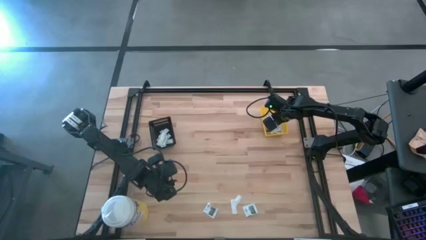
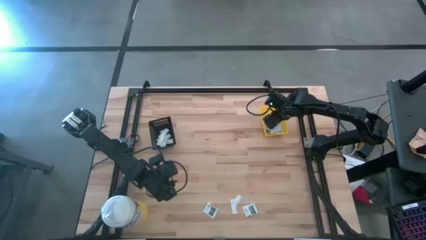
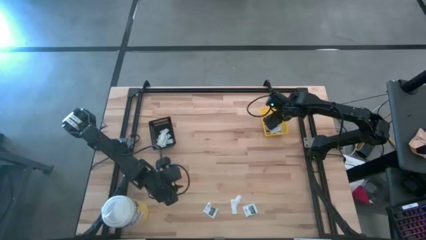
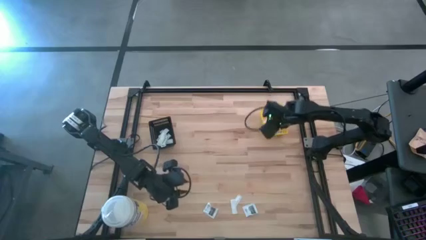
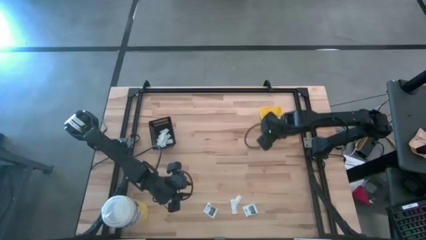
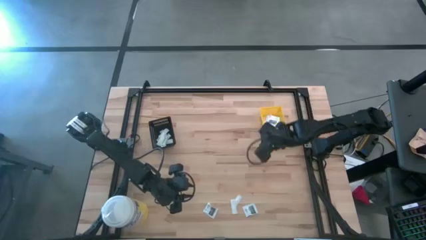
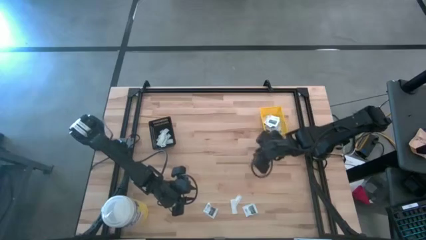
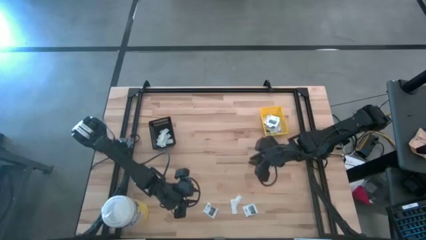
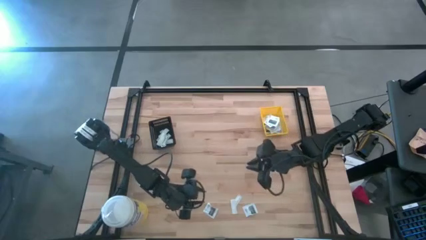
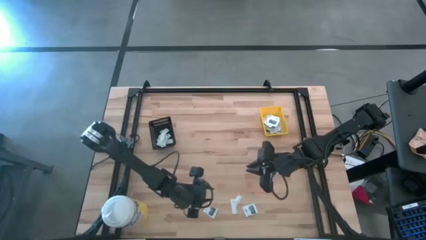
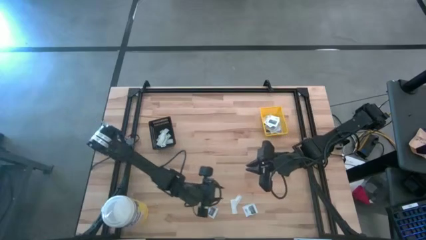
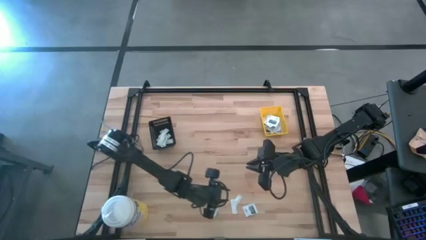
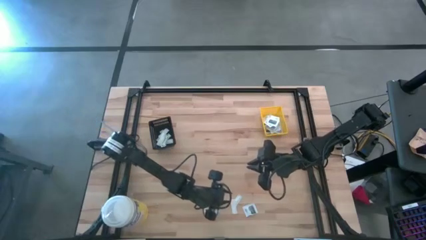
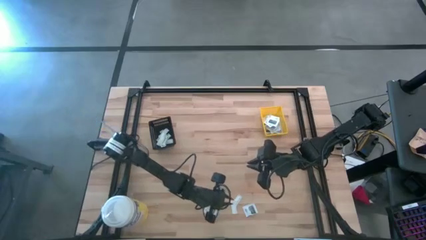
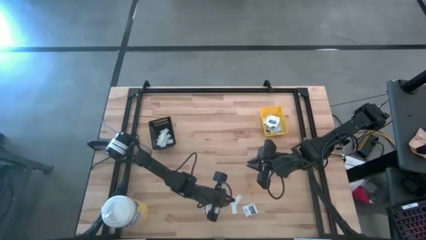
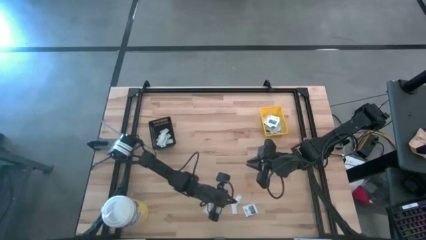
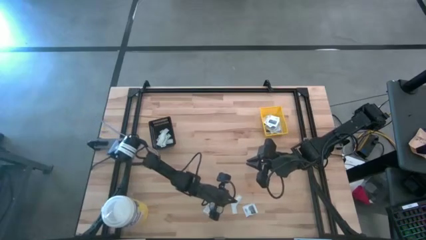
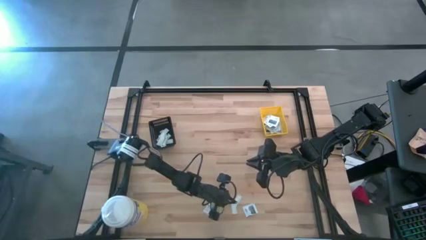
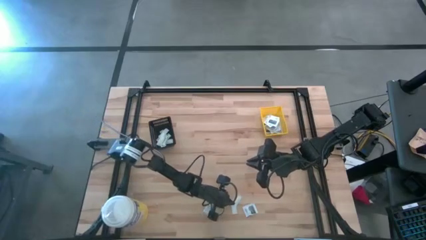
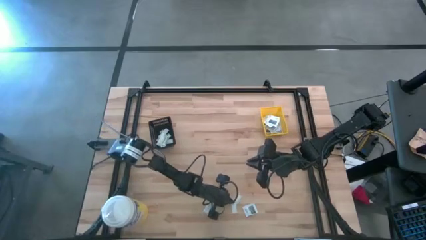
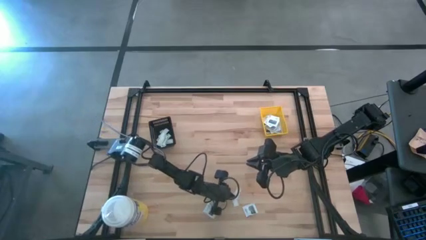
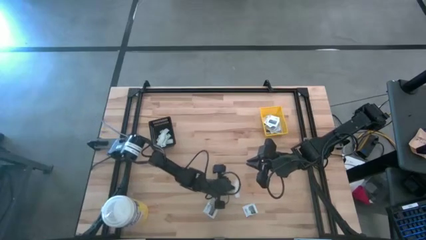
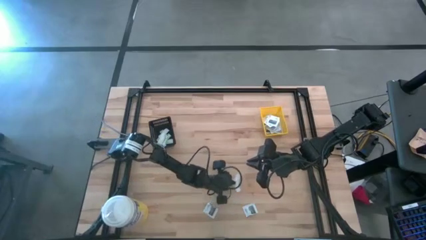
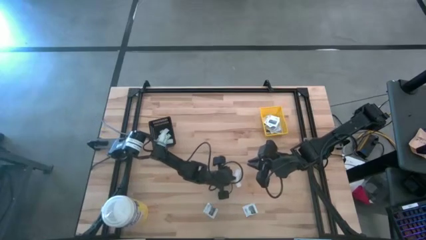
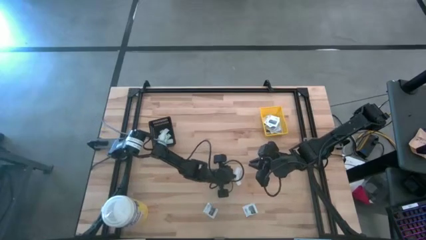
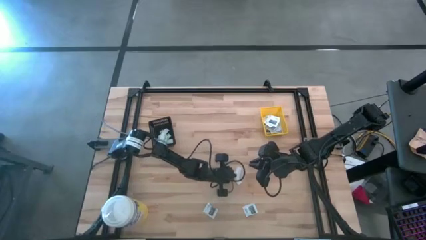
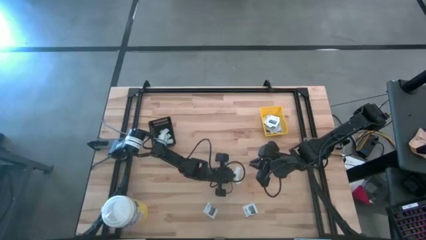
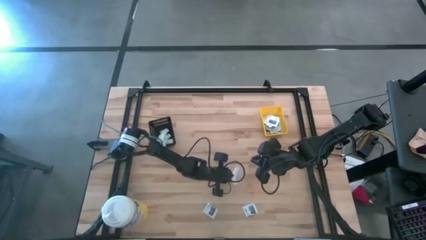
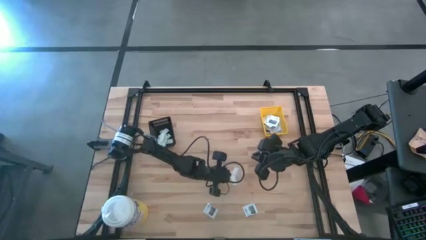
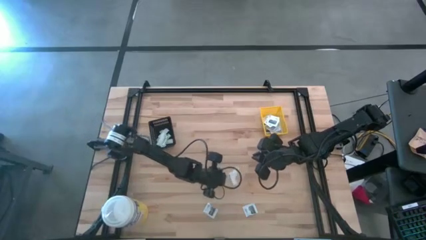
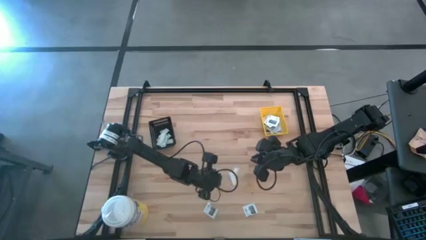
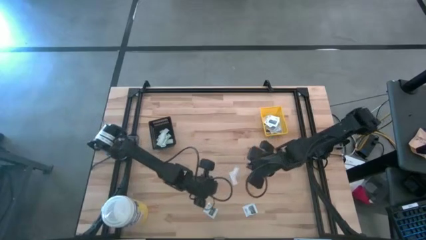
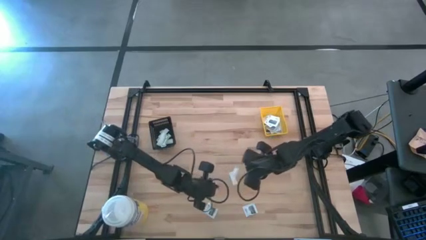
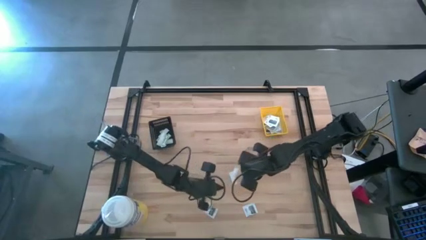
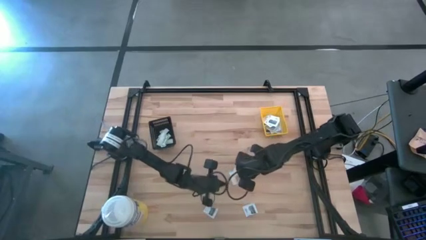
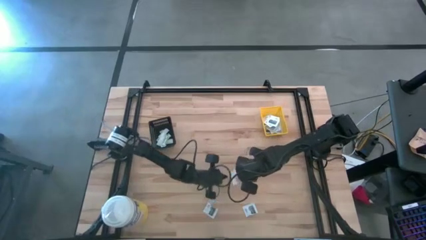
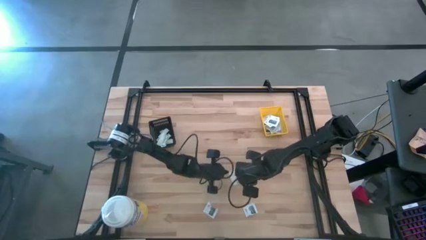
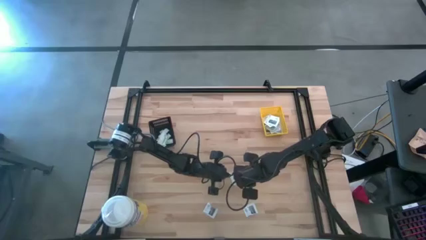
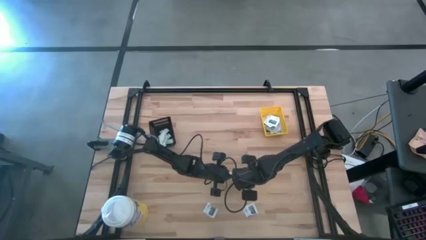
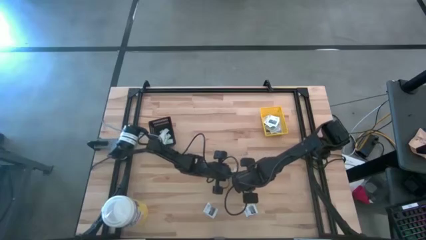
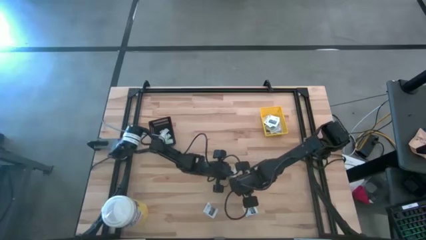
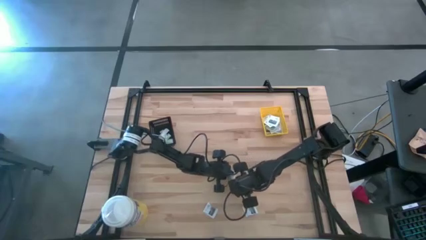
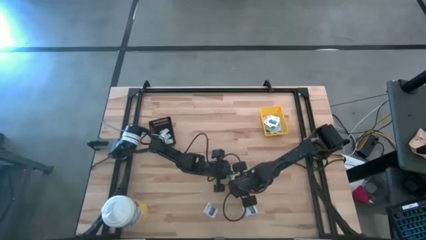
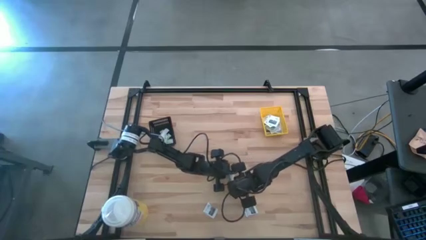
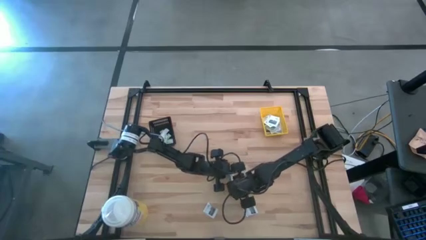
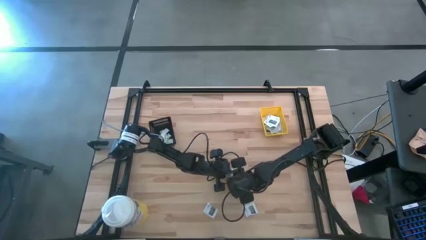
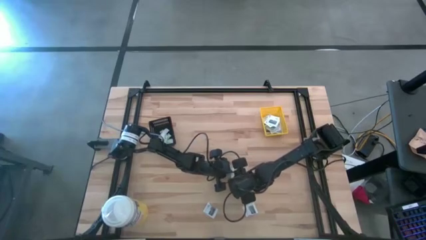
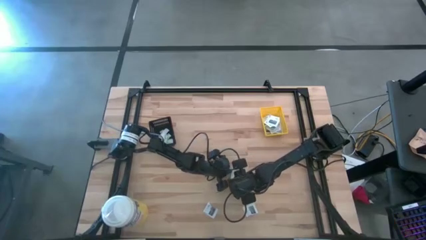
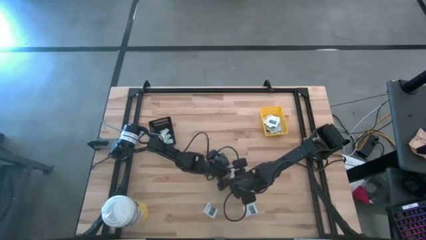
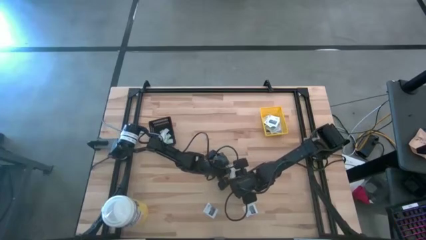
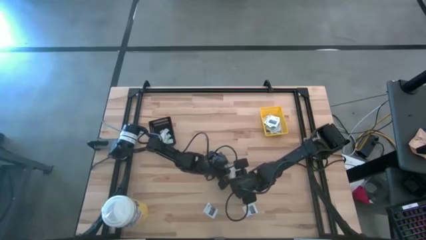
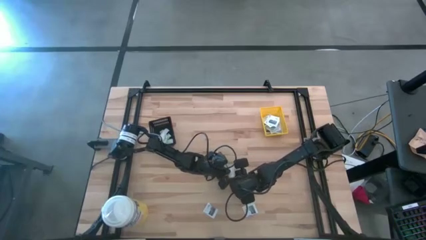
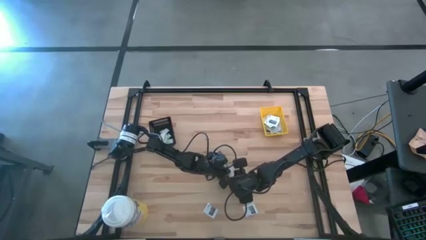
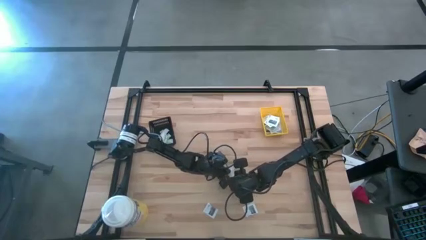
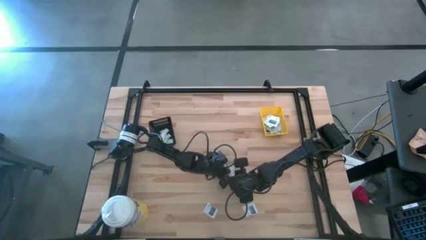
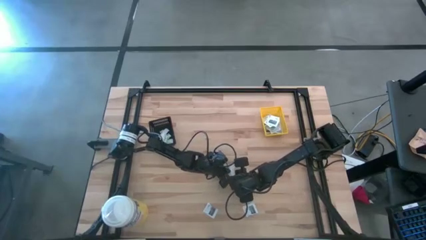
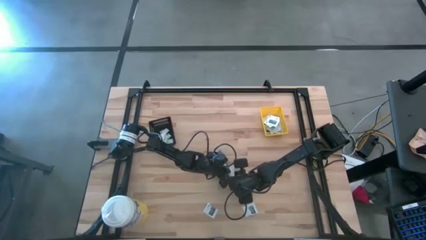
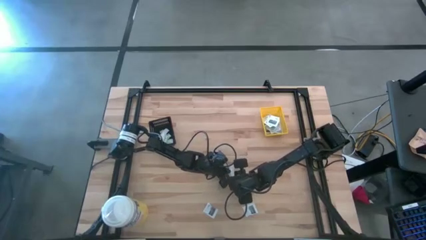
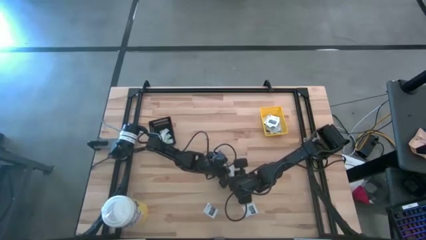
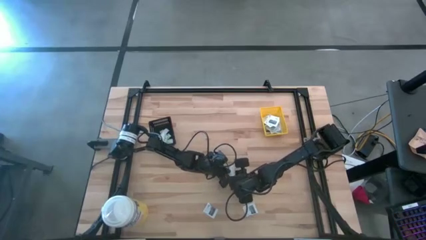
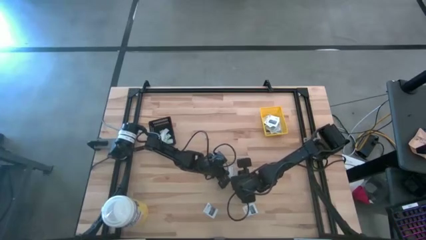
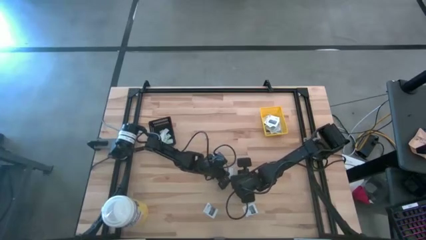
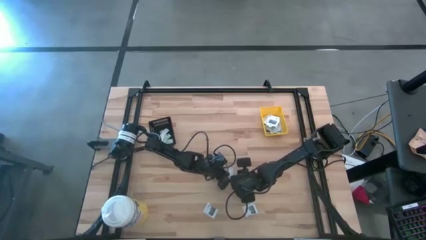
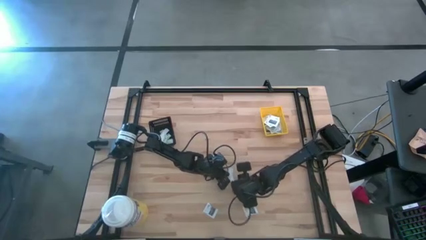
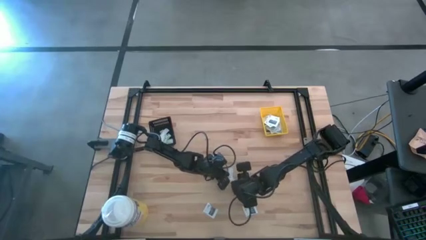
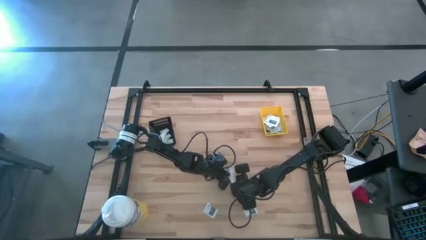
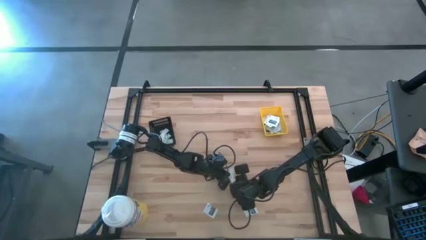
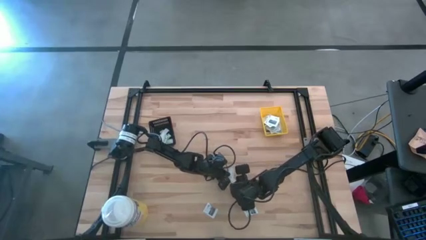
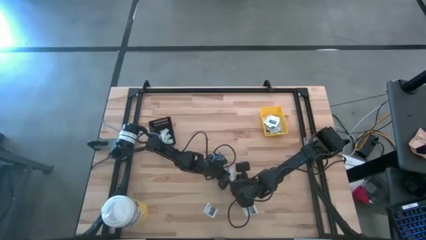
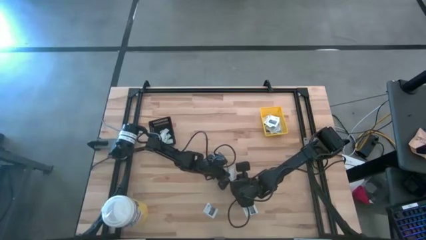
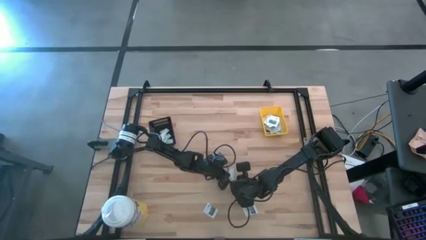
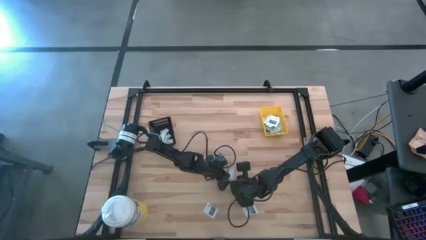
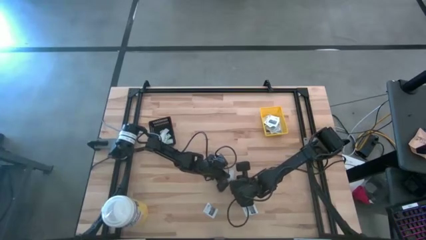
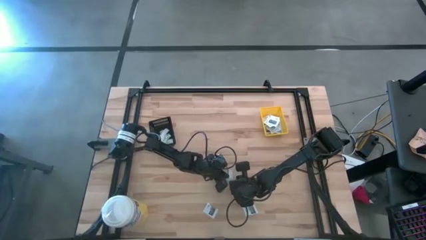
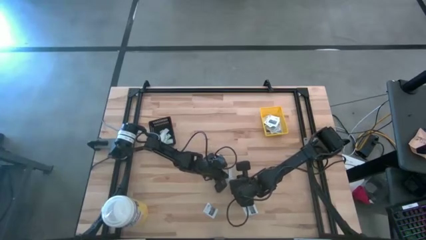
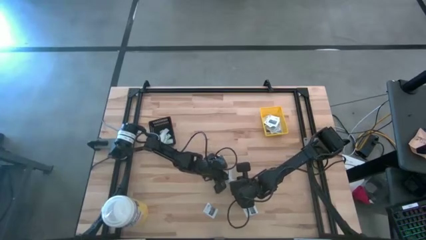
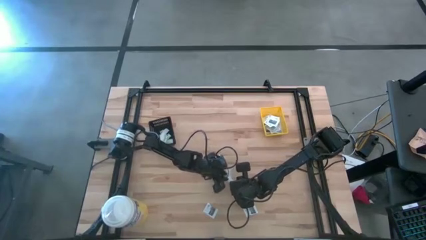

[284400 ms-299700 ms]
Task: Pick & Place First Aid Supplies
Put the green bandage into the black bin
